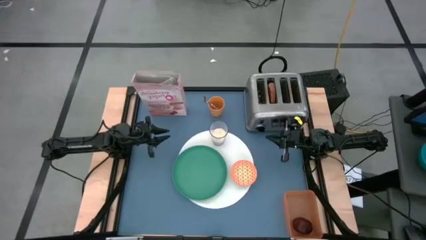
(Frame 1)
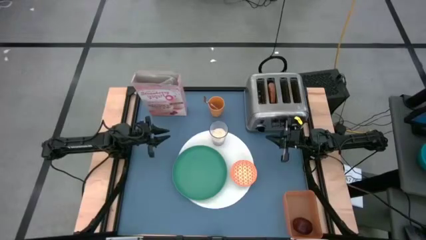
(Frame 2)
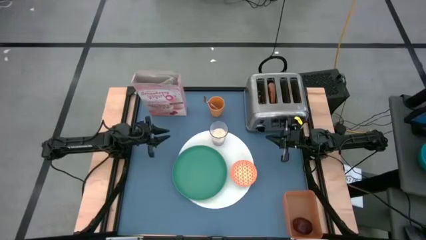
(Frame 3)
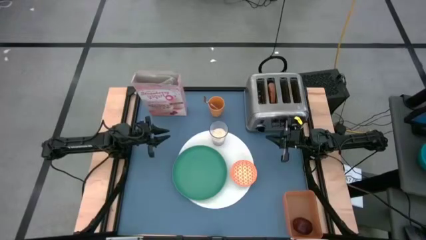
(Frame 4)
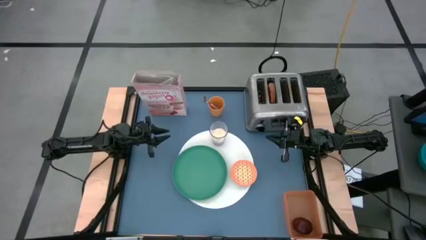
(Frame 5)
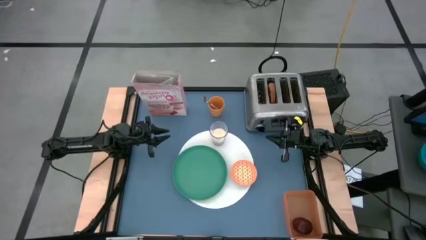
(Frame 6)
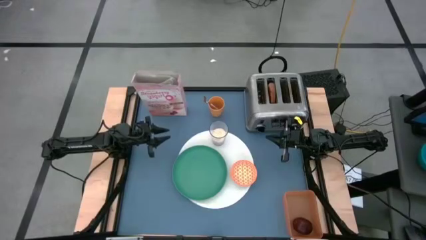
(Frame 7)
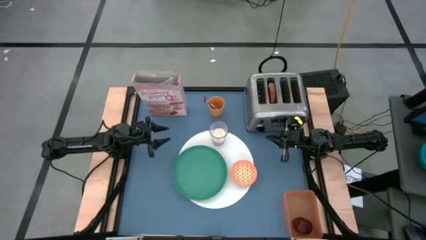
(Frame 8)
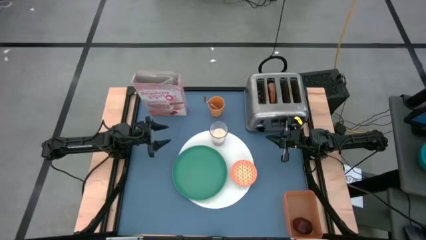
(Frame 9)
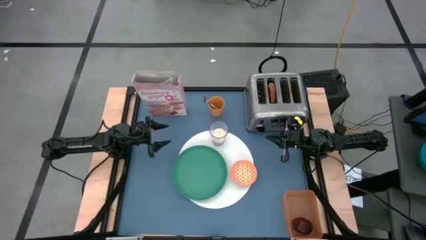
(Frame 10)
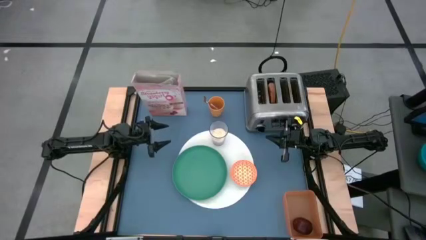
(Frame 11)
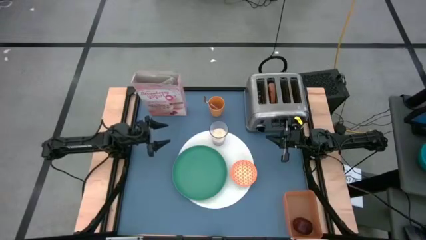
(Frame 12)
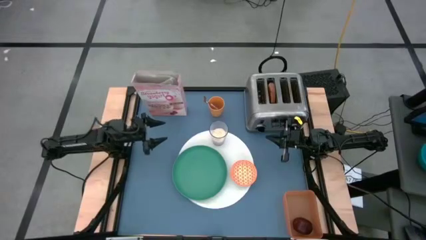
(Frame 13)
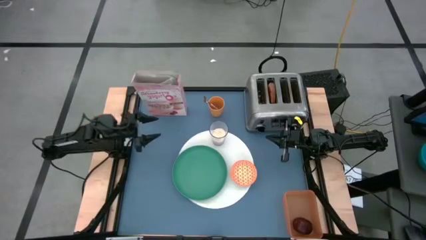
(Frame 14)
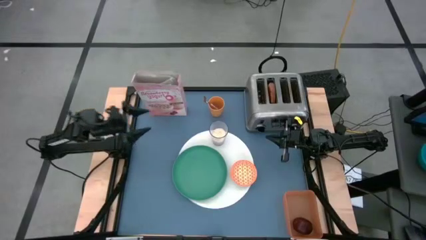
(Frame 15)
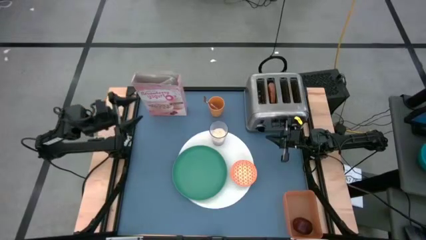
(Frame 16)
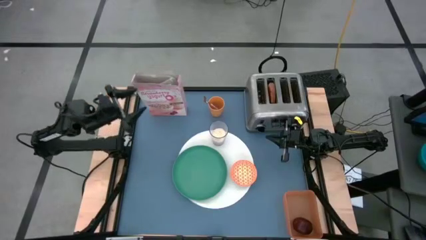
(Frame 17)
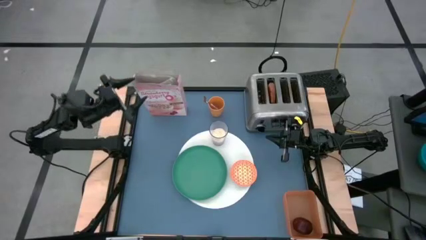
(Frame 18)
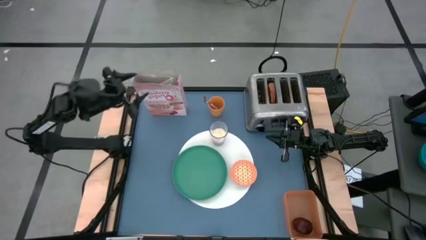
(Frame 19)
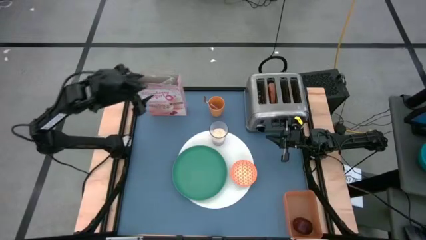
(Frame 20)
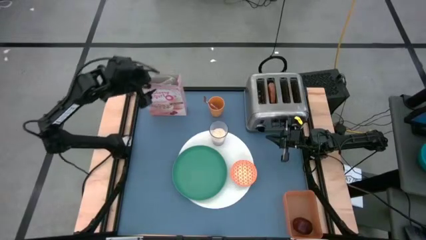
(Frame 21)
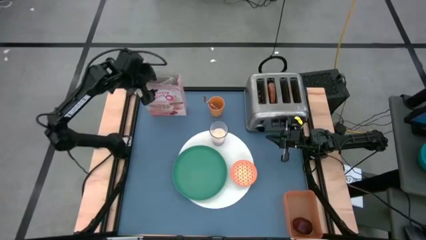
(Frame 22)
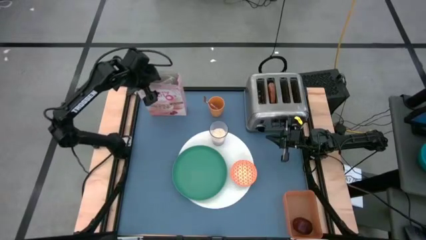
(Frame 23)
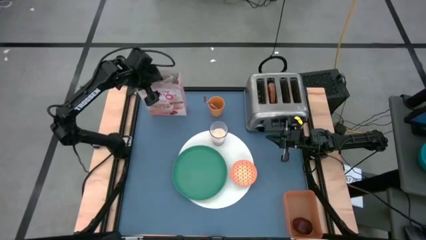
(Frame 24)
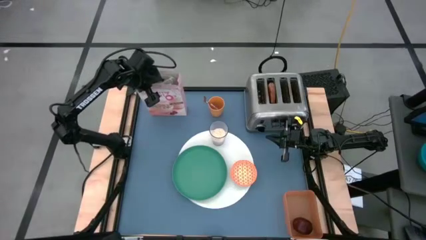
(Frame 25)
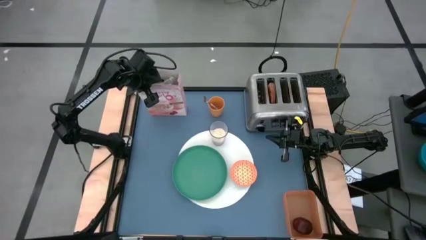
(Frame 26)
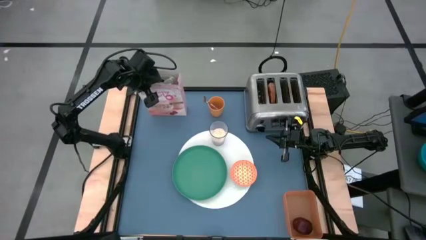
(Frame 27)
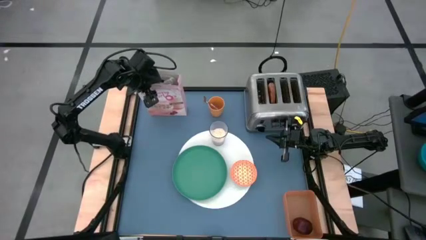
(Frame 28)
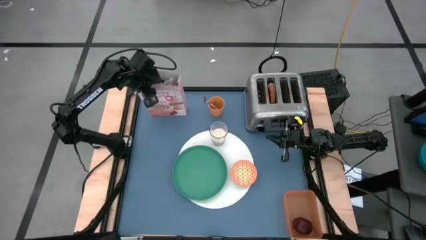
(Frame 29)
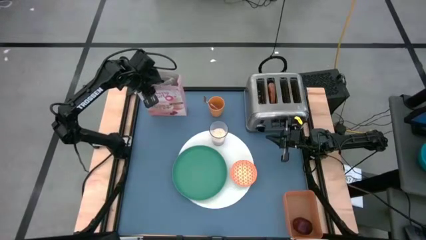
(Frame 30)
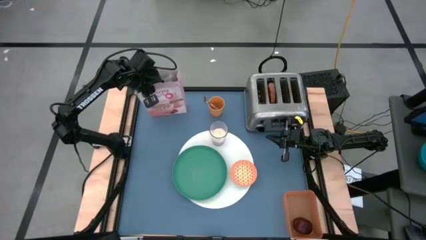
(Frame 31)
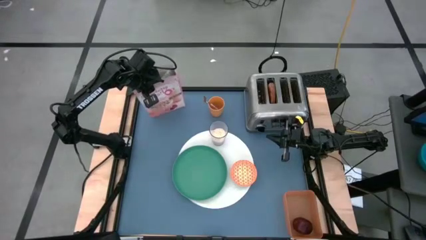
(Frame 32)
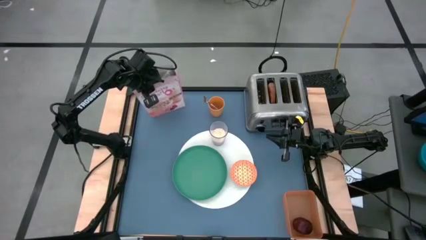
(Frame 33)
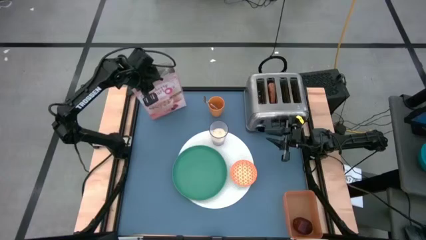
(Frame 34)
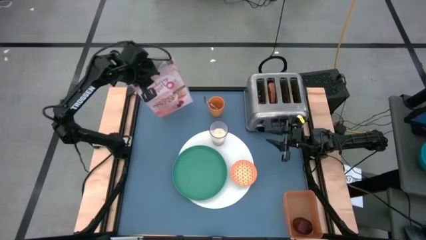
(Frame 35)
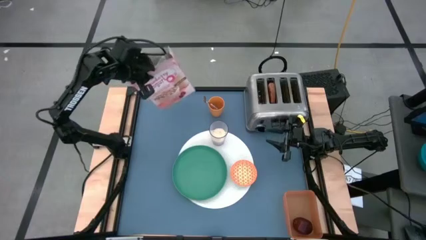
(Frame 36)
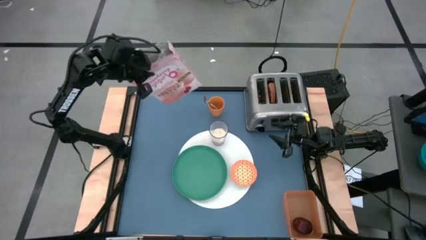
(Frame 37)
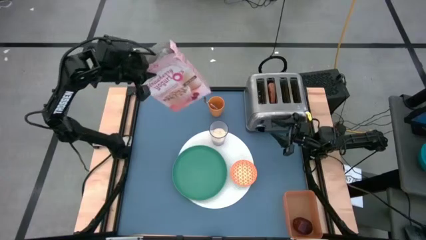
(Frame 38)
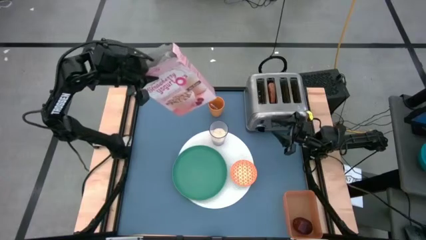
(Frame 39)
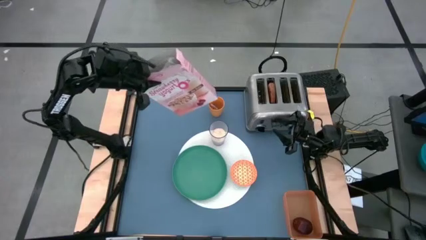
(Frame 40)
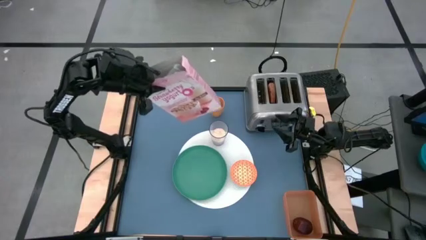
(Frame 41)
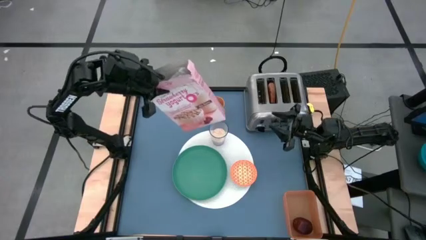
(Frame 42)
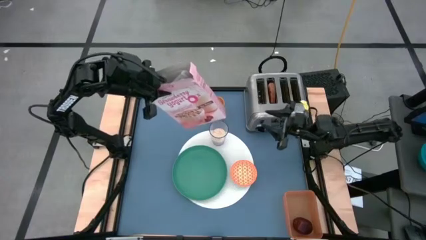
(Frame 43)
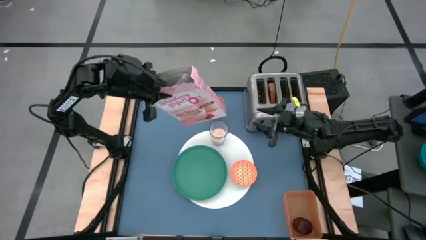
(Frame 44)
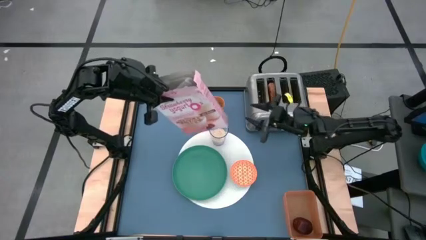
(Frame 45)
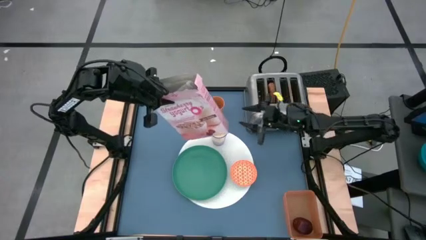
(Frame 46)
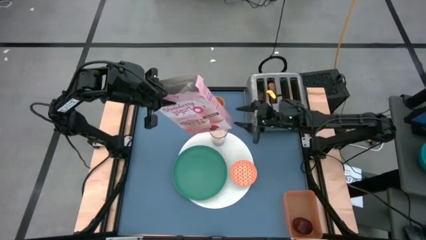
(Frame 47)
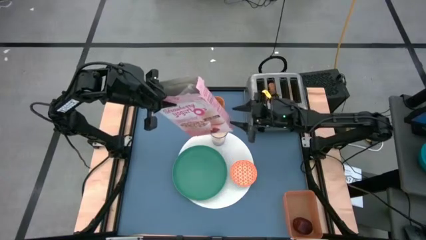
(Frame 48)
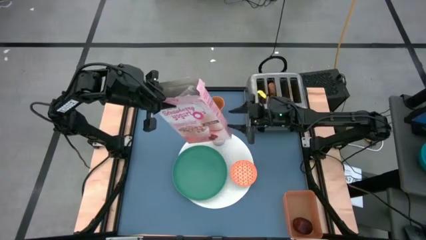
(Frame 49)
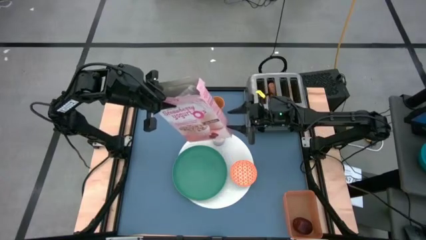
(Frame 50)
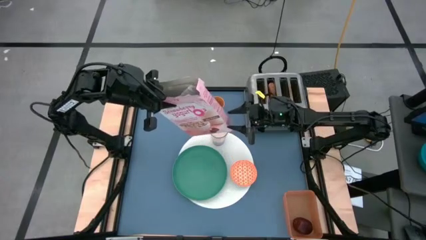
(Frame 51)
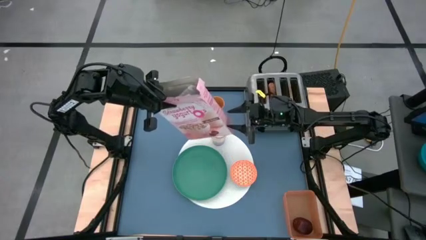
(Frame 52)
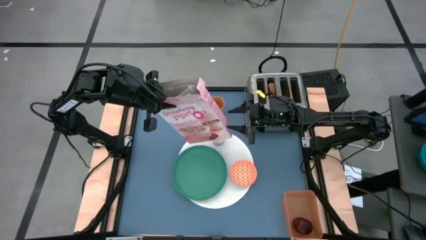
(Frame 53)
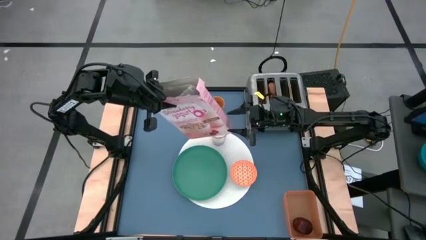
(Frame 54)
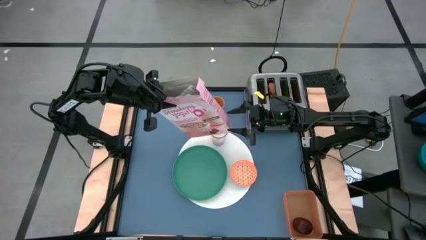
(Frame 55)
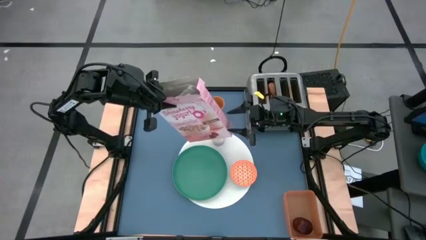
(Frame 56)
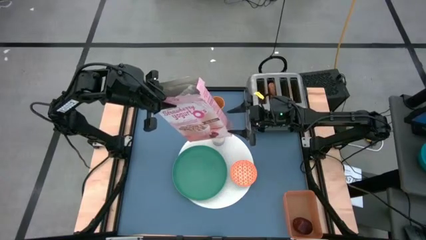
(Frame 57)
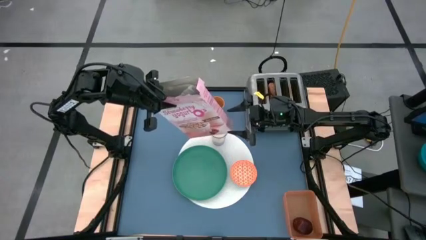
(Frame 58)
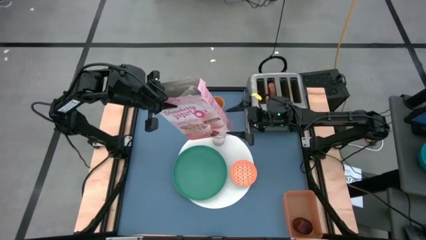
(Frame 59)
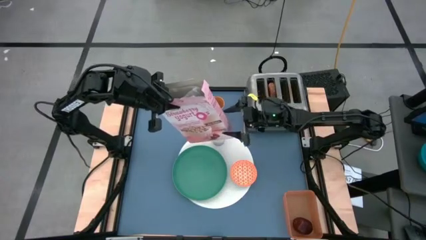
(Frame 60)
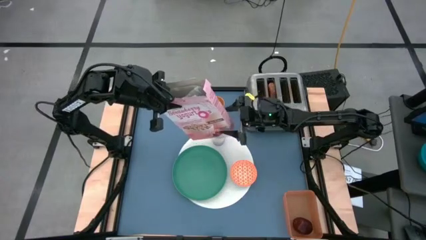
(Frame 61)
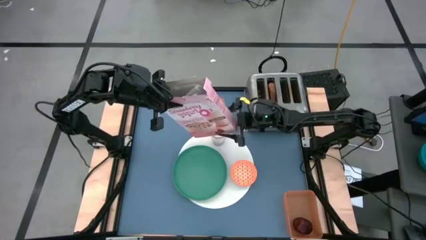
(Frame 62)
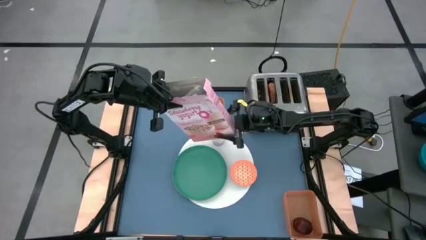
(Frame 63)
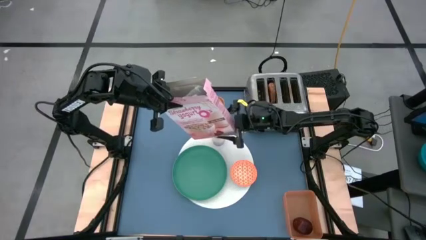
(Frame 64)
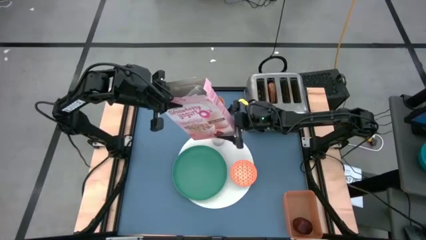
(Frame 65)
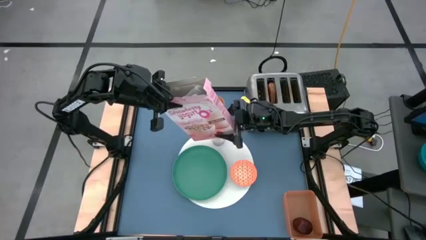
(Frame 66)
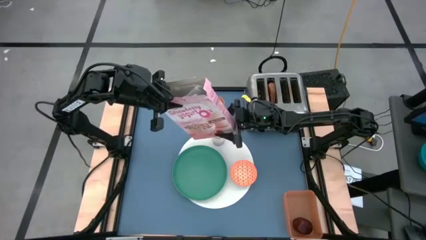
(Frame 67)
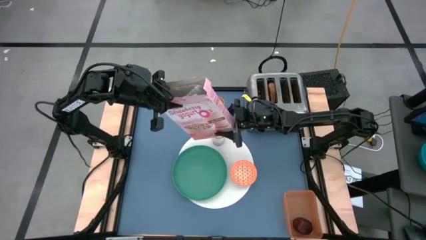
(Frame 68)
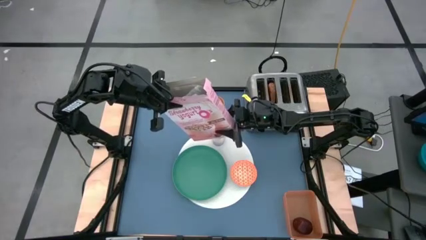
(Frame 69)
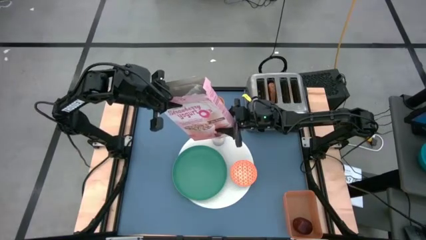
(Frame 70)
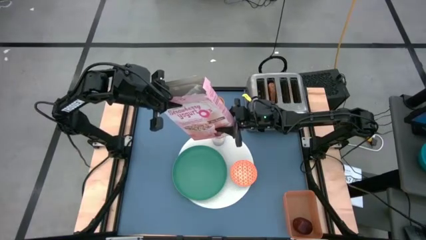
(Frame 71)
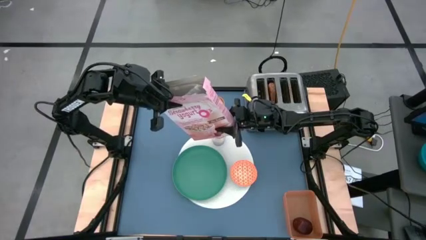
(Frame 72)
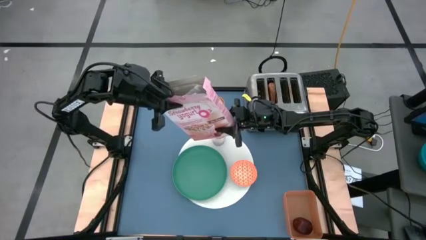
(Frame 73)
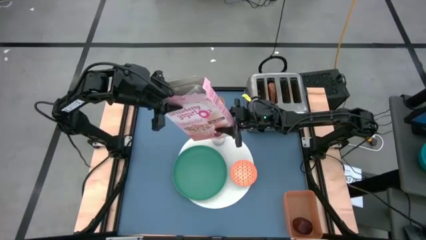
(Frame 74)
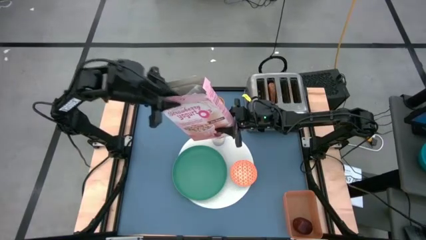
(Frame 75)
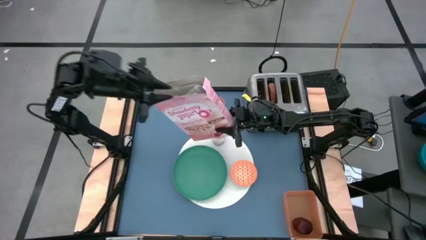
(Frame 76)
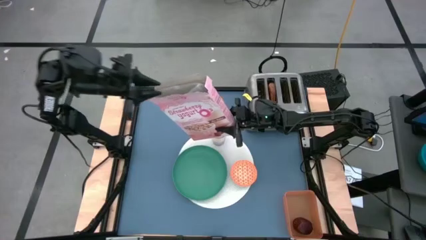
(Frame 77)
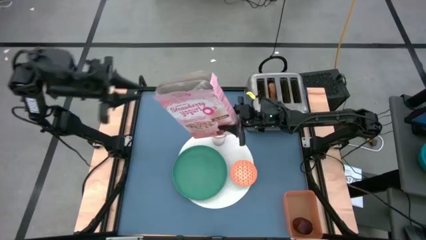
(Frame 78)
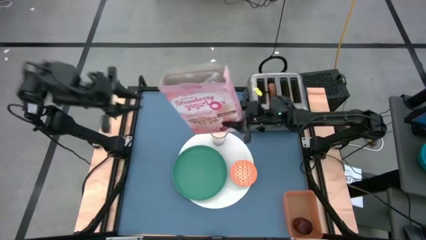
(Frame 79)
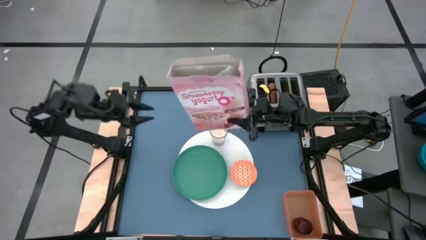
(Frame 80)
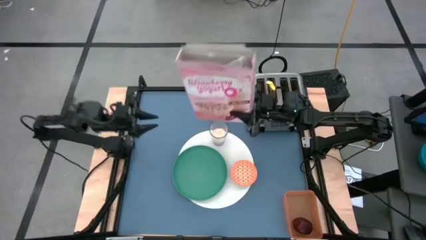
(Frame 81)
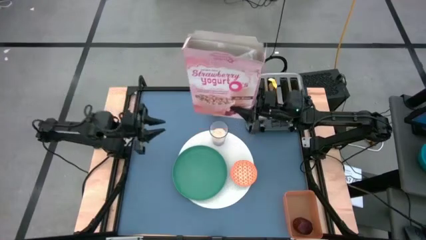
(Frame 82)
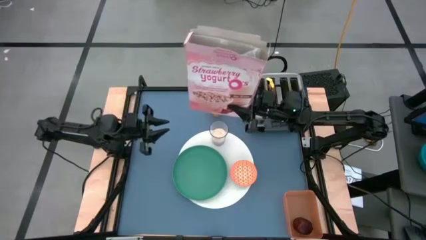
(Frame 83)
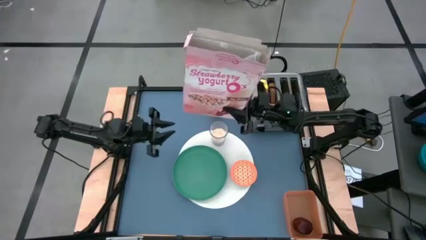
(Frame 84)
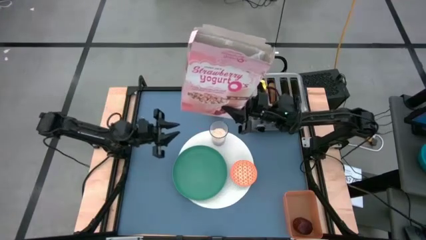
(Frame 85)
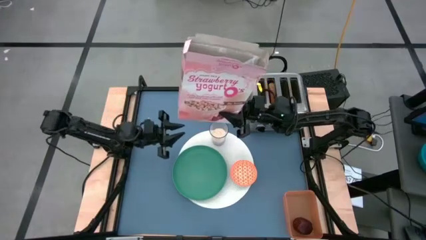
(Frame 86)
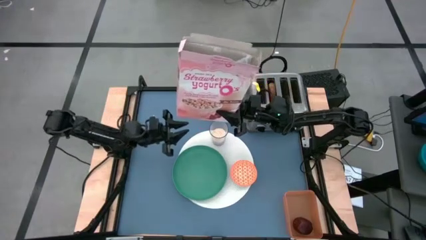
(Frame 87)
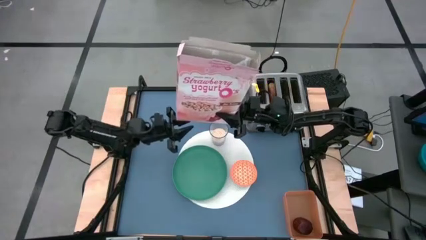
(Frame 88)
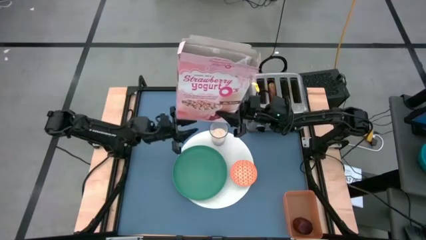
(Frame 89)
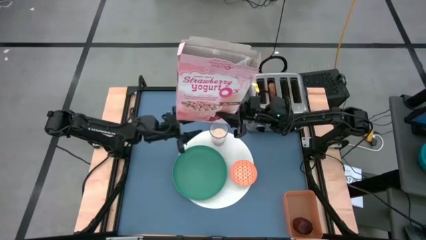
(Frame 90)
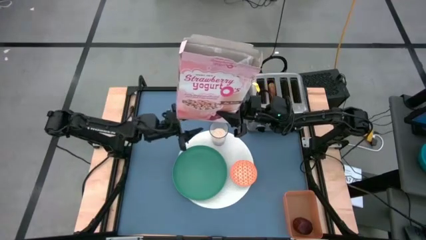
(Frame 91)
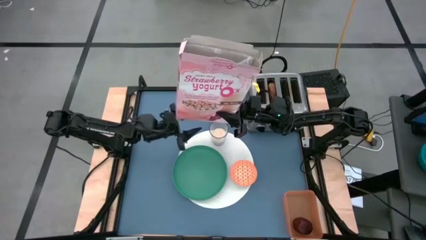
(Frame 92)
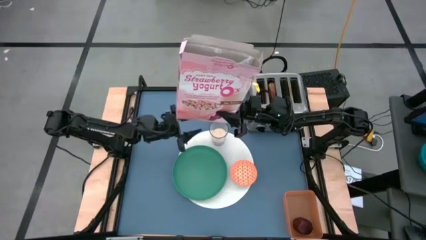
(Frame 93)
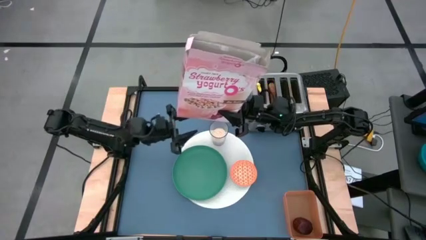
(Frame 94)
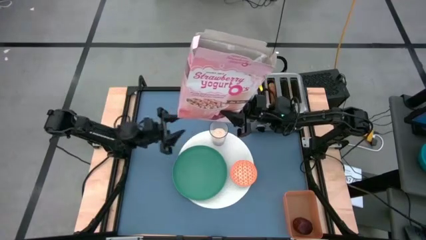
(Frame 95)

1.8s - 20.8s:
Task: Arrange a breakfast setting
Pour the cereal from the cereal box into the orange bowl
